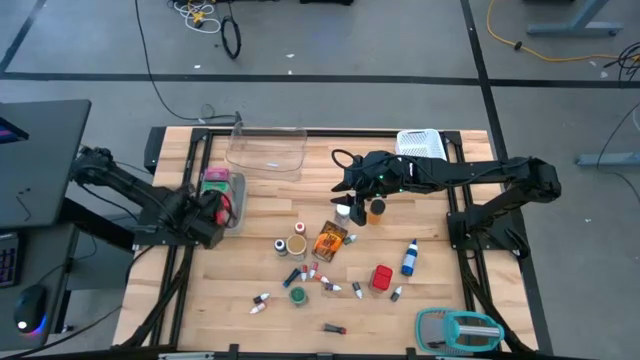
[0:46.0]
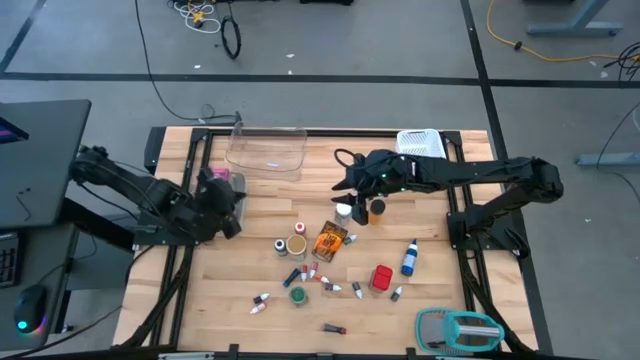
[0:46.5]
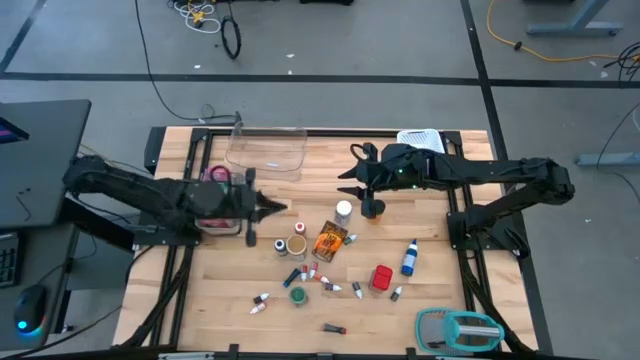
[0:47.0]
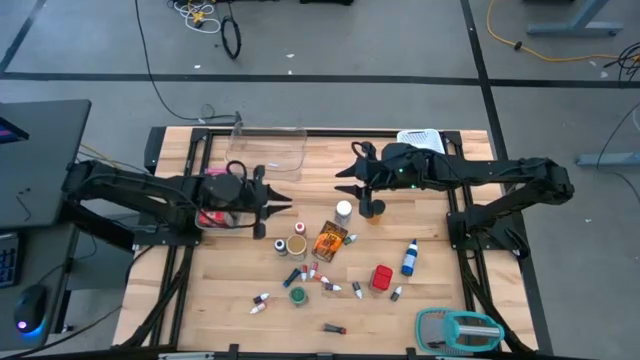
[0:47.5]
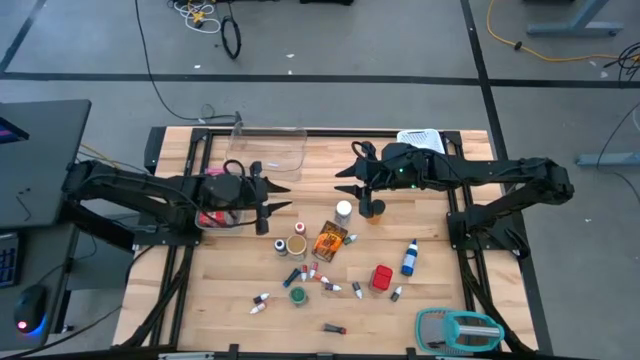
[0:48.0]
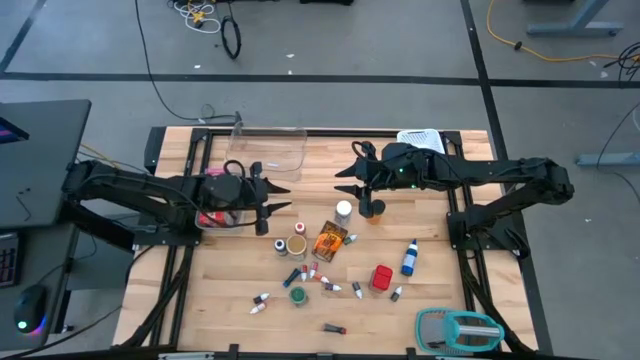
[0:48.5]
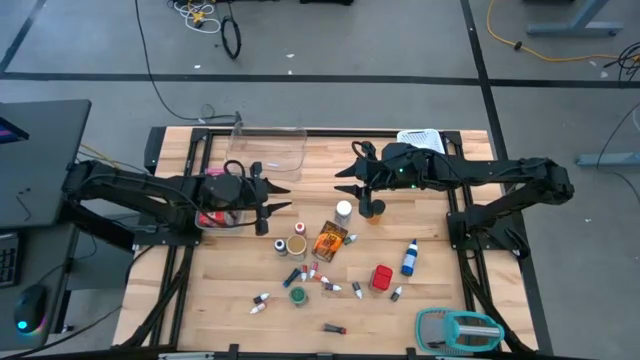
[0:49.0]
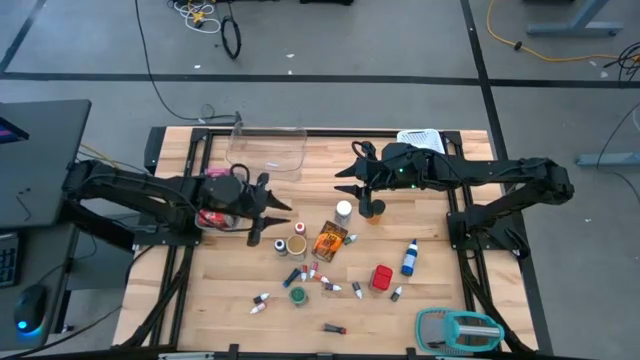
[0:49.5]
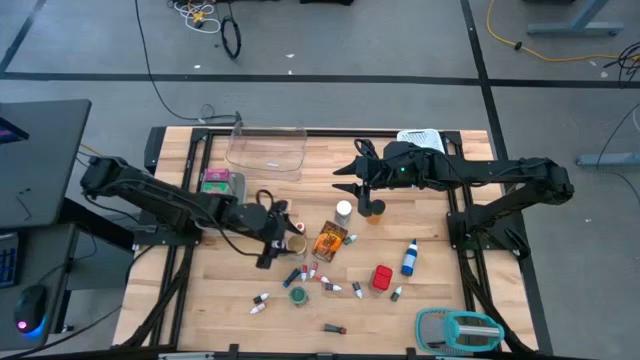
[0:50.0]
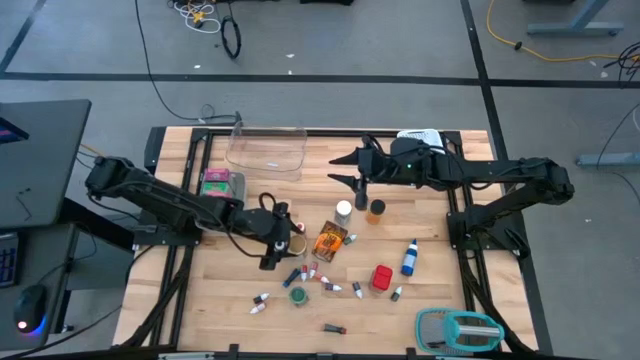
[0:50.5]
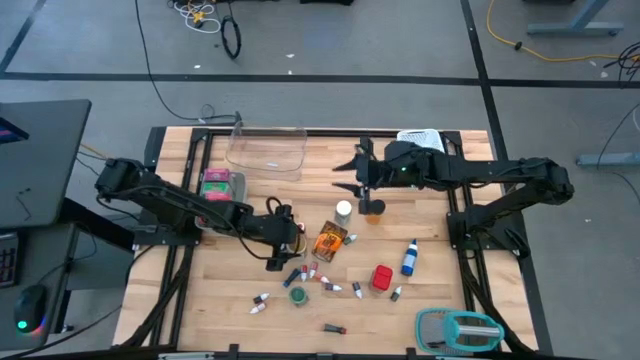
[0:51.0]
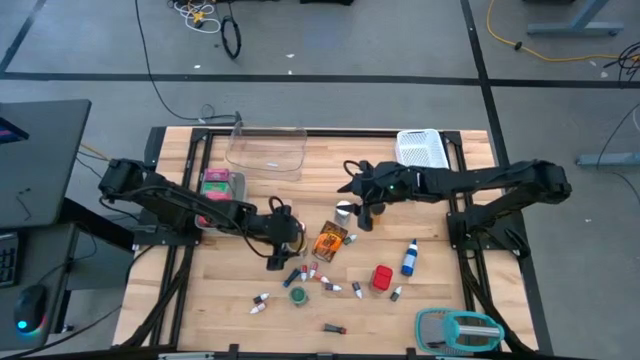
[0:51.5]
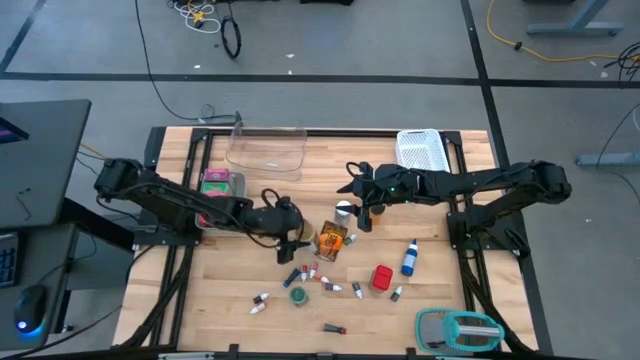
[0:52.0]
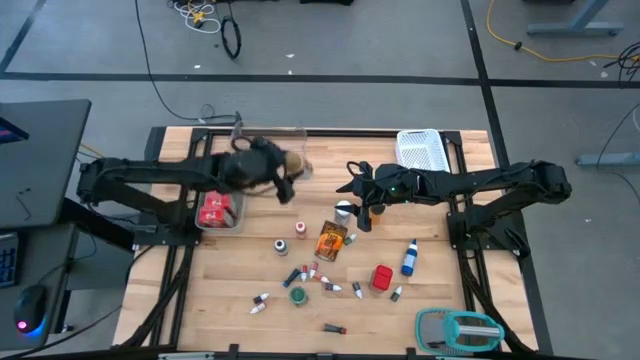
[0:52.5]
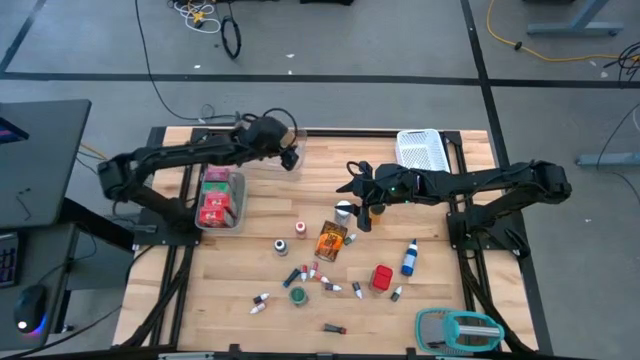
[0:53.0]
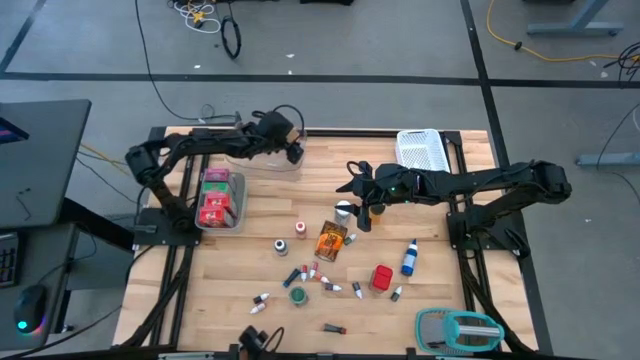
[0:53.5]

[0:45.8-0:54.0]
Task: Pick & Place Kitchen Items
Put the gold seasoning bottle into the transparent bin

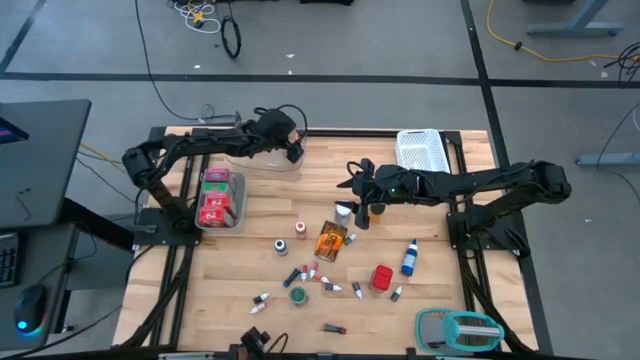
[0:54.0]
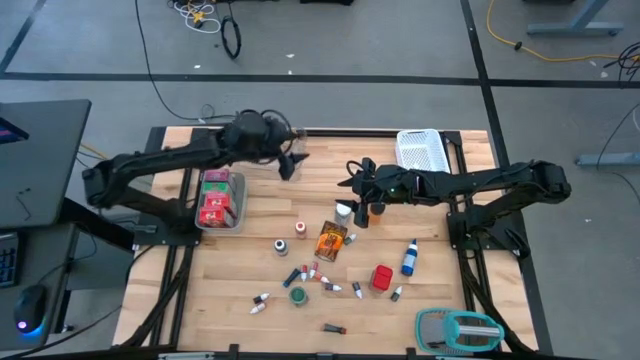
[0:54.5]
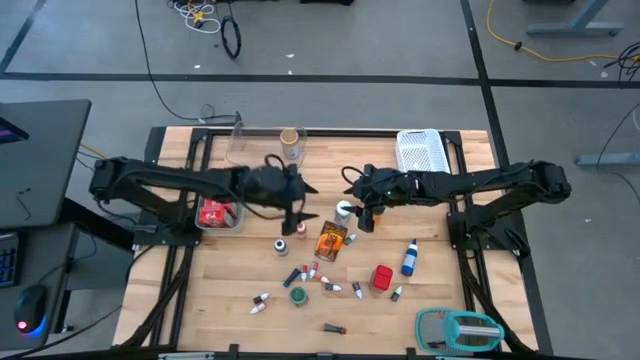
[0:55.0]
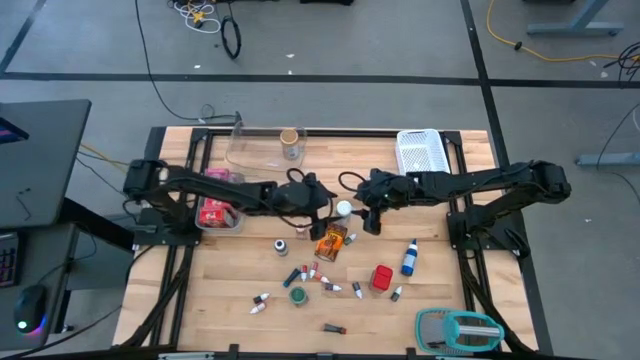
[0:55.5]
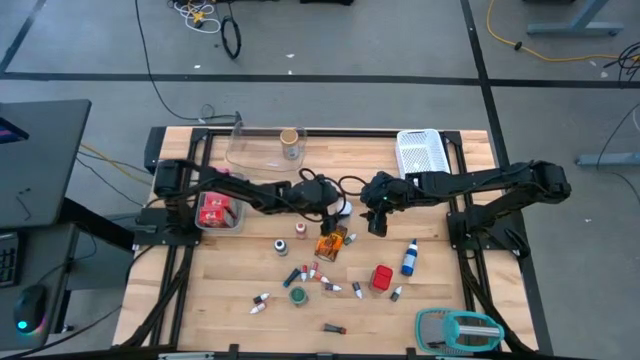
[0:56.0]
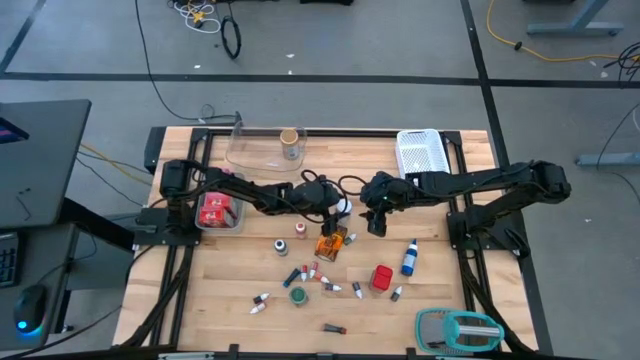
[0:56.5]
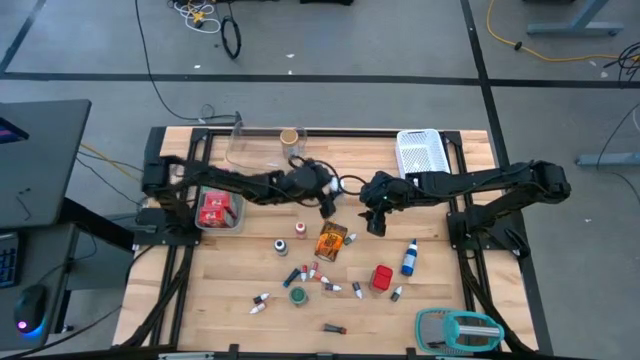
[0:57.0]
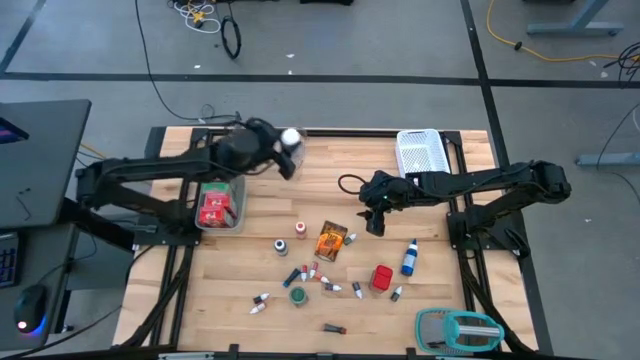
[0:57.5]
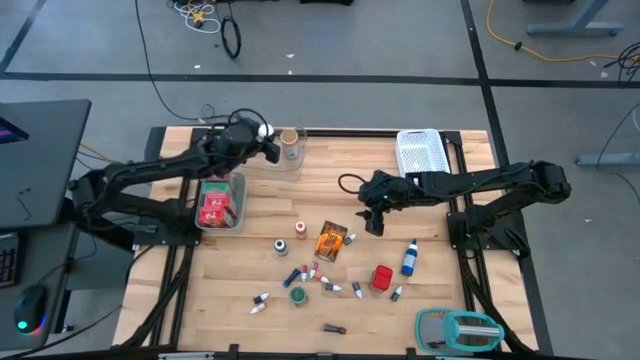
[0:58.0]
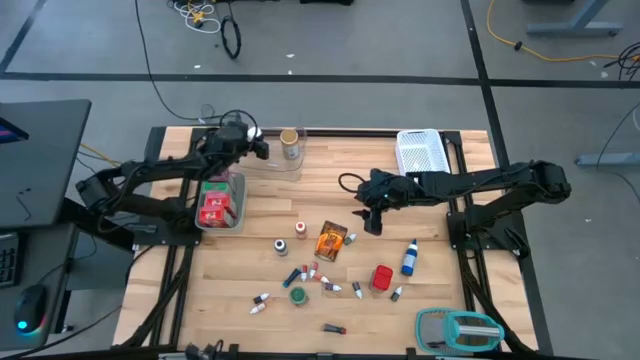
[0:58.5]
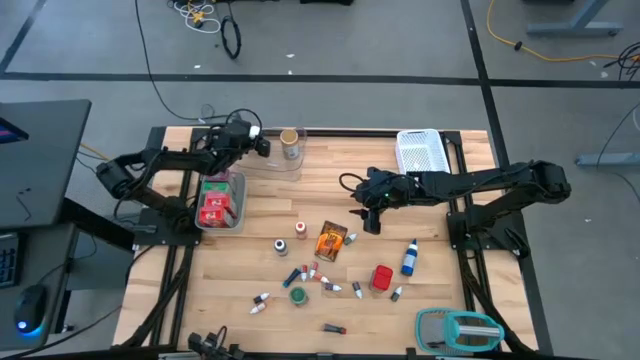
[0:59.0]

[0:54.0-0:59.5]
Put the white seasoning bottle into the transparent bin

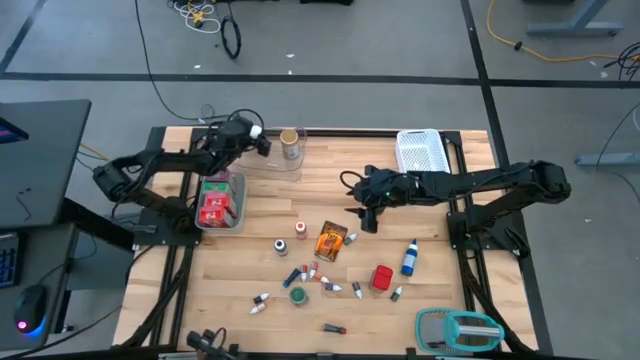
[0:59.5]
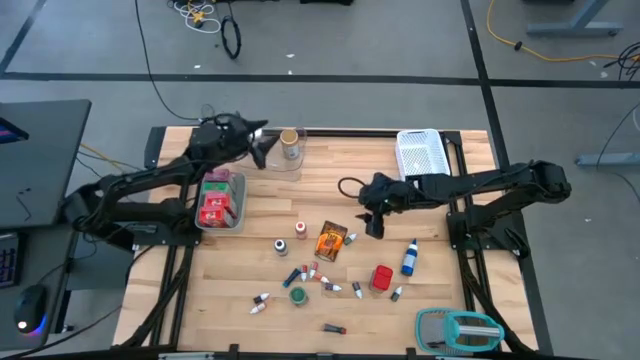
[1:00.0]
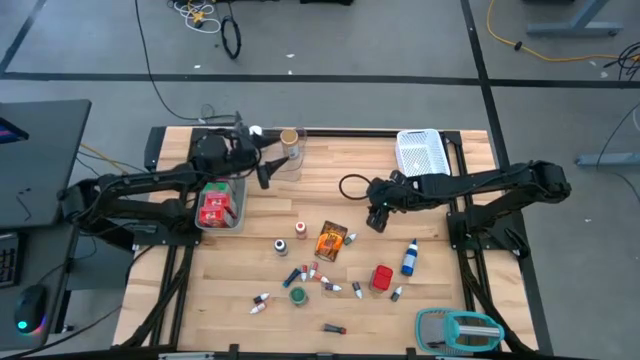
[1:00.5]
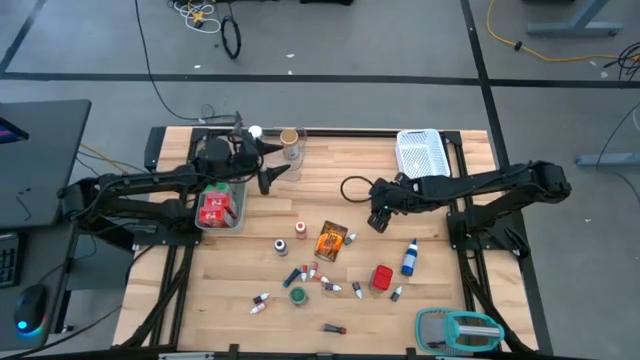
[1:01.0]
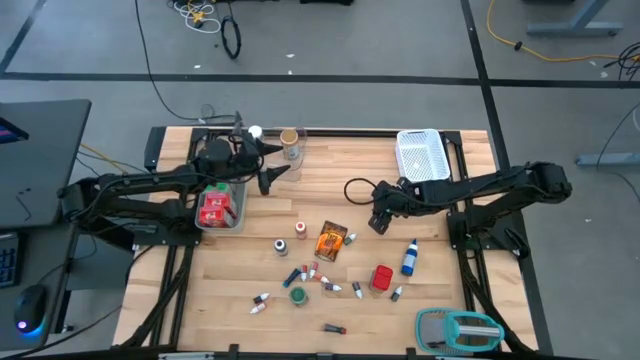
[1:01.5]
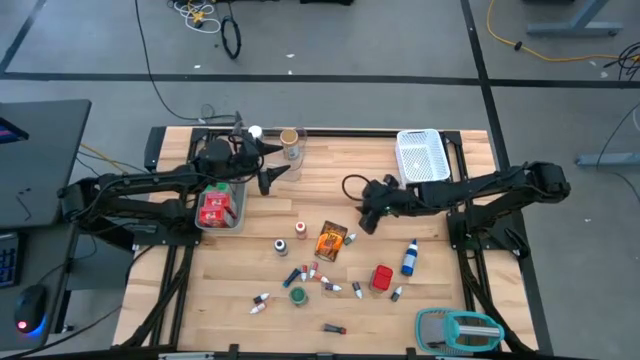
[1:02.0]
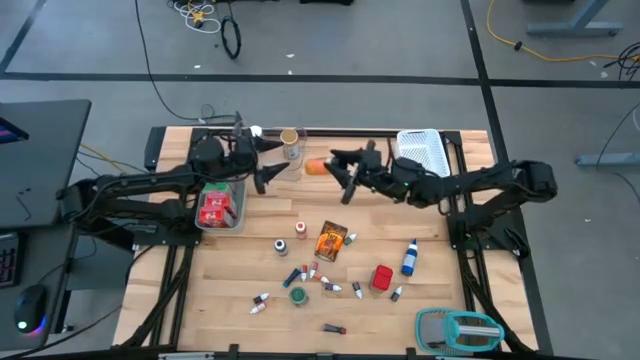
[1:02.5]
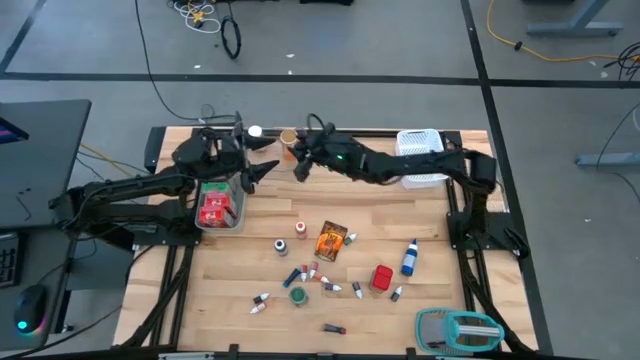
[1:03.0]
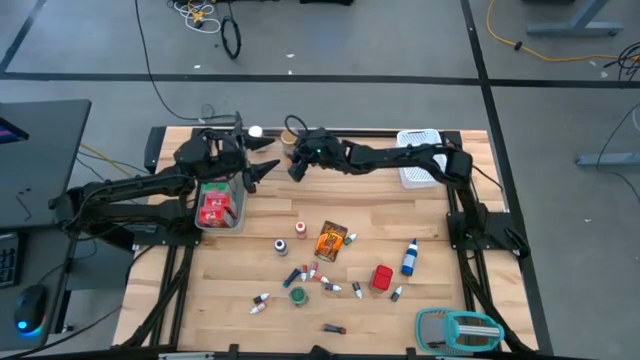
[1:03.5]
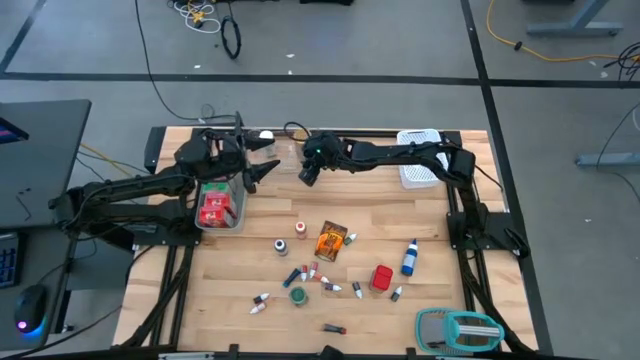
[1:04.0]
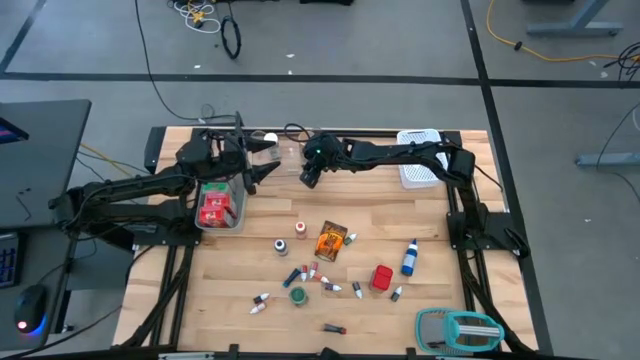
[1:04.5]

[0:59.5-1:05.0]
Put the orange seasoning bottle into the transparent bin

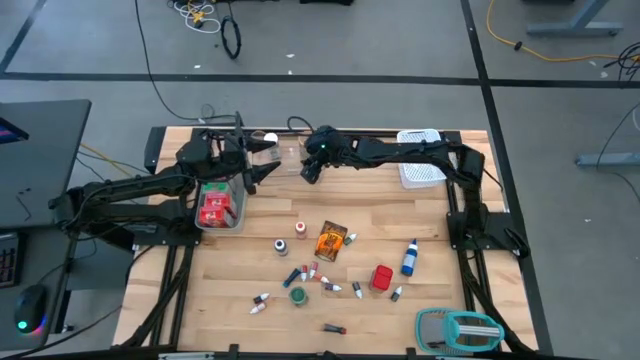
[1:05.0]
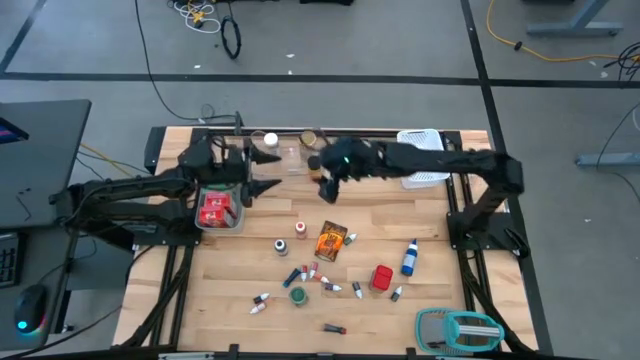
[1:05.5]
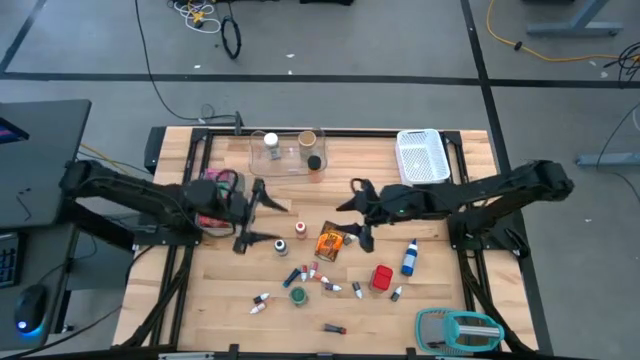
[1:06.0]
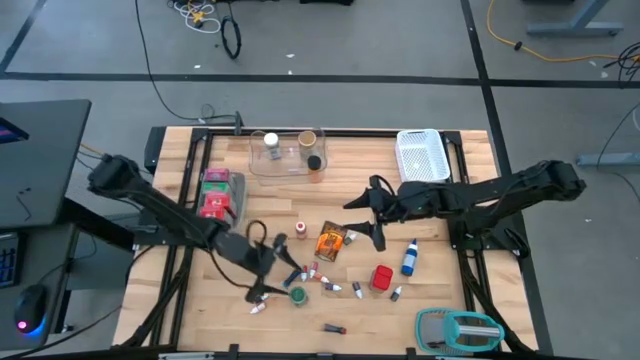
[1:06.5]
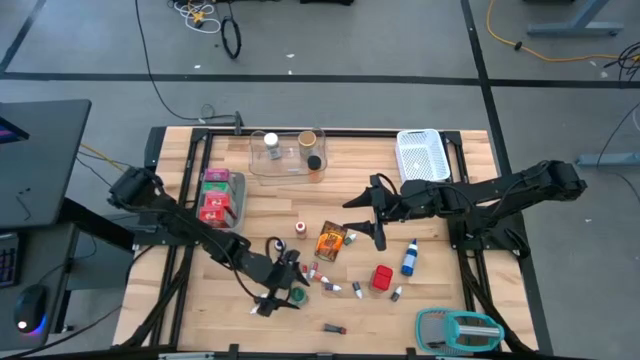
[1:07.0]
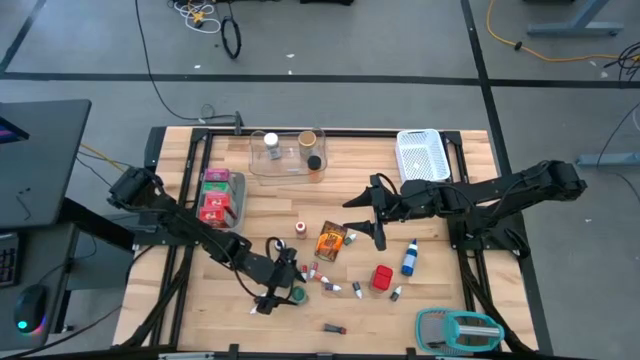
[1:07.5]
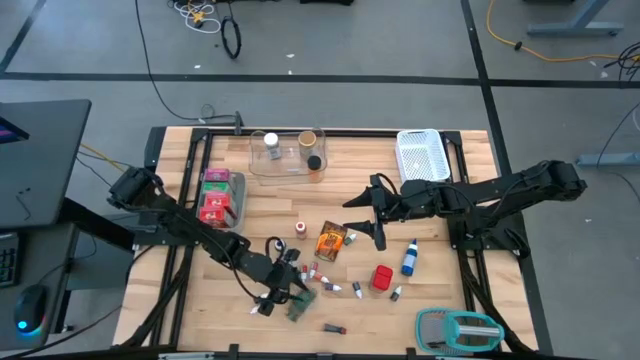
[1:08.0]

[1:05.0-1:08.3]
Put the green seasoning bottle into the transparent bin
